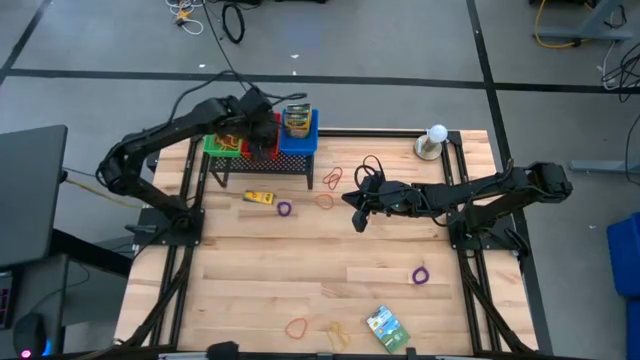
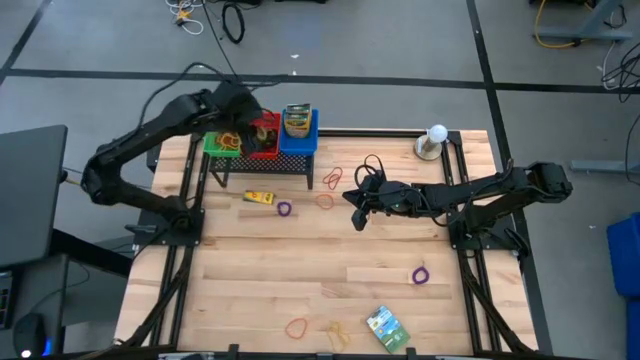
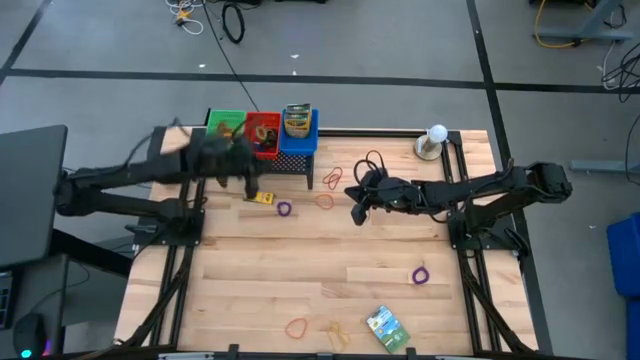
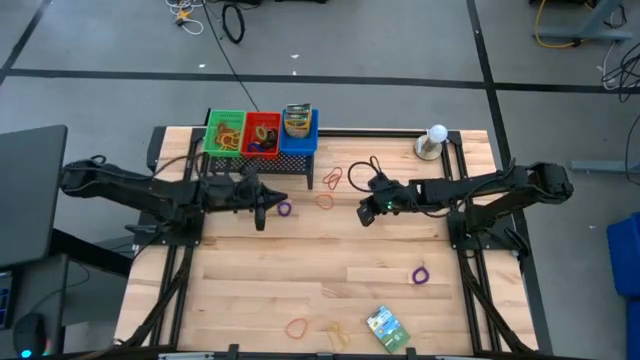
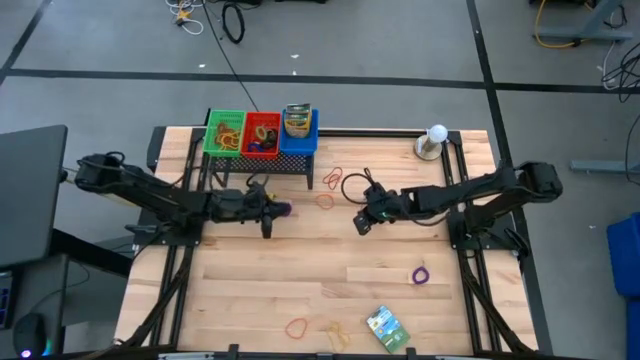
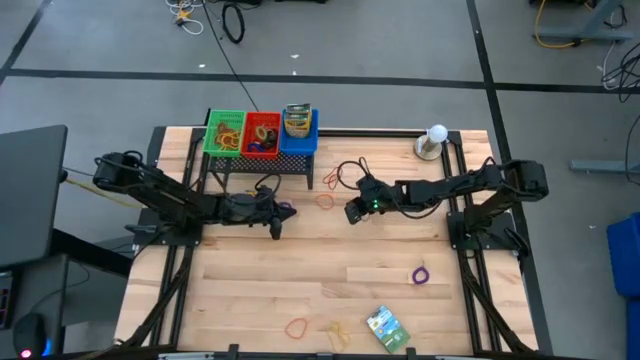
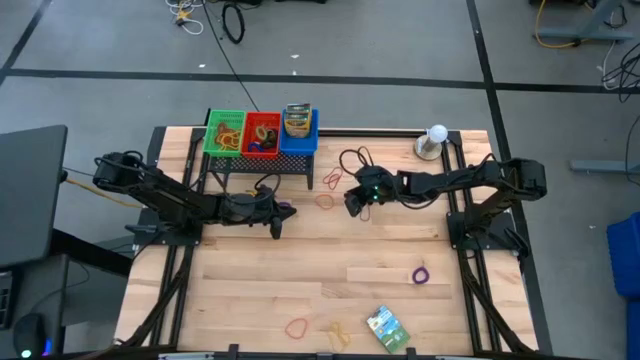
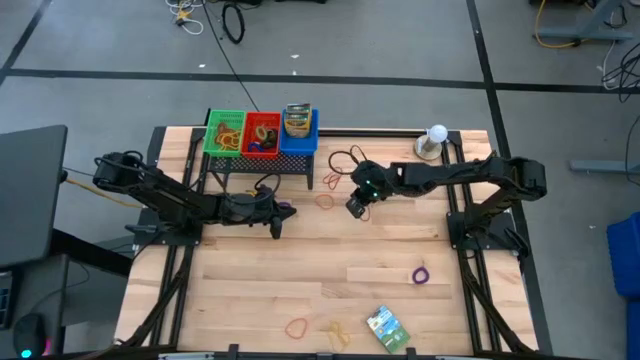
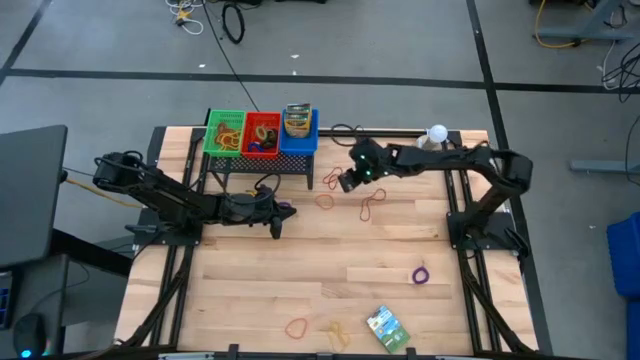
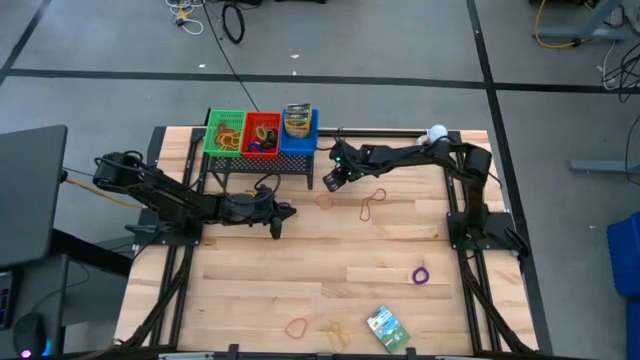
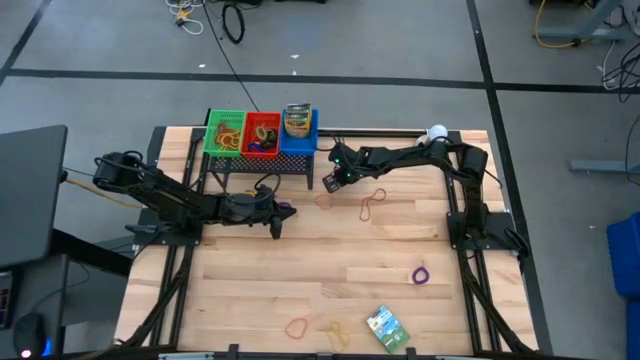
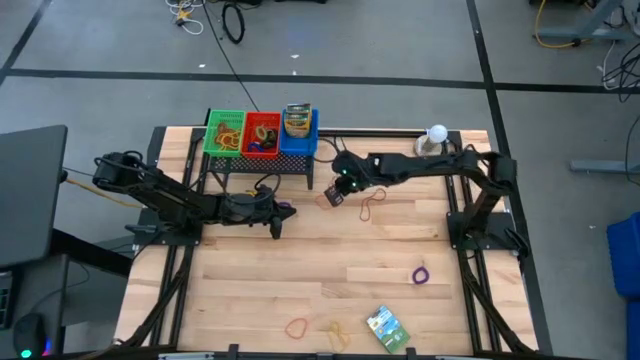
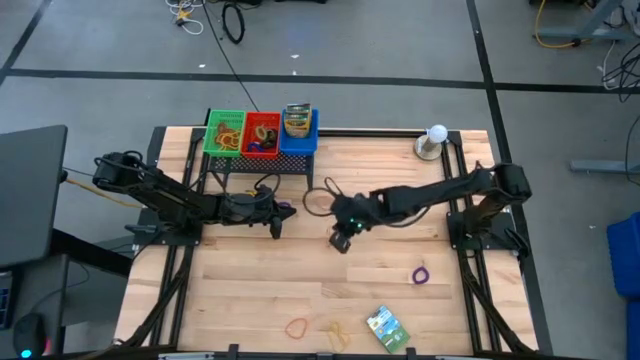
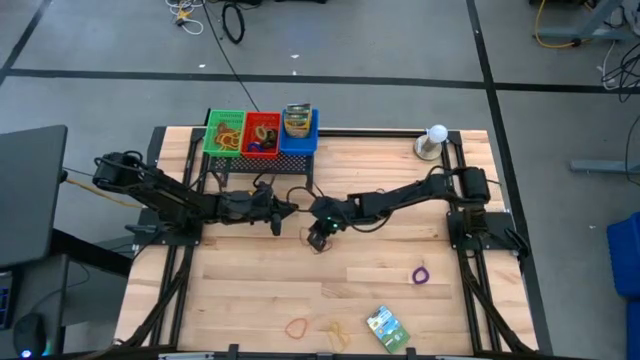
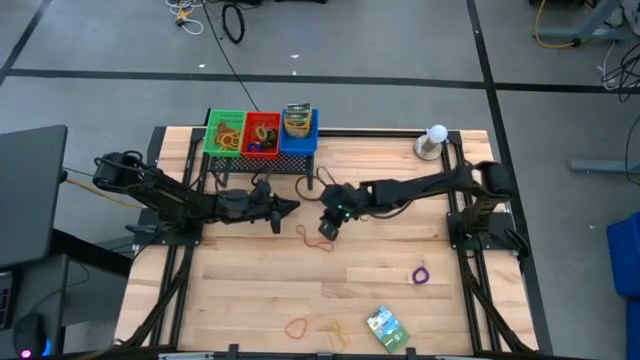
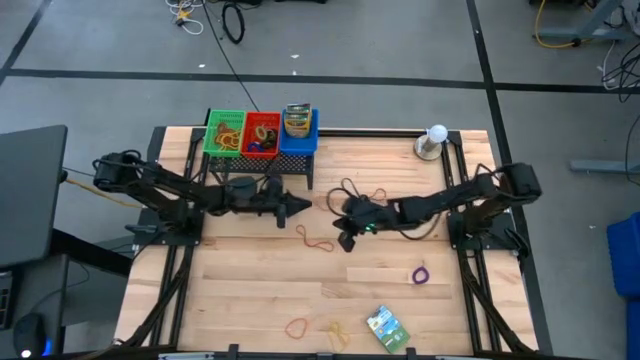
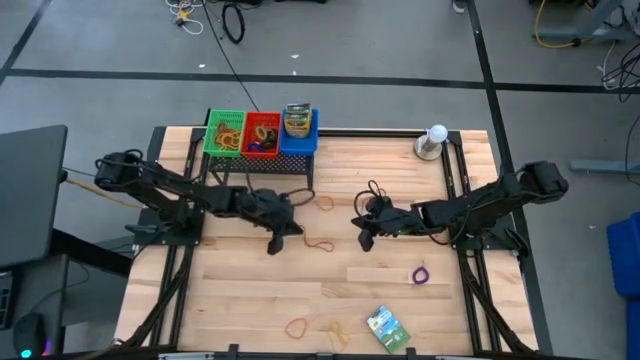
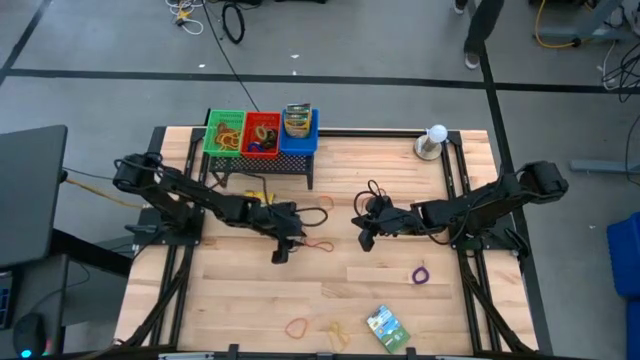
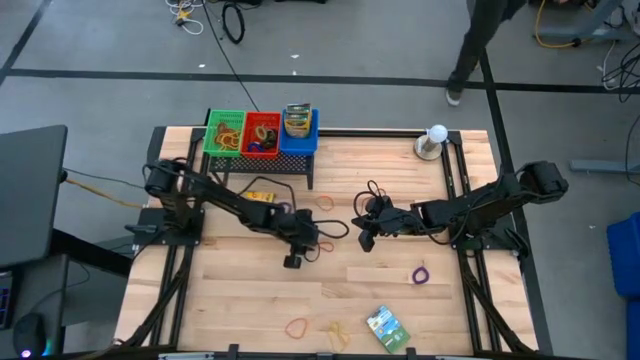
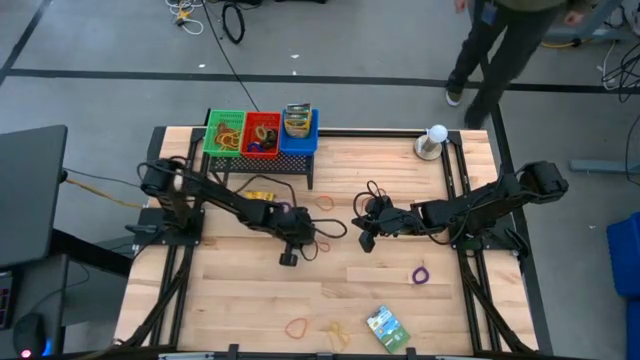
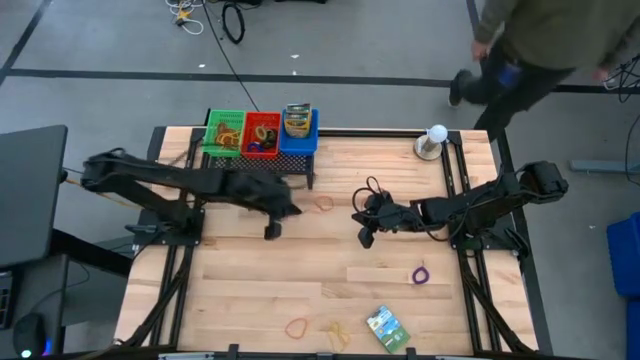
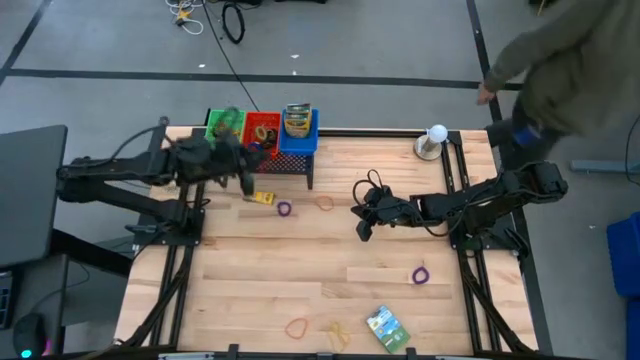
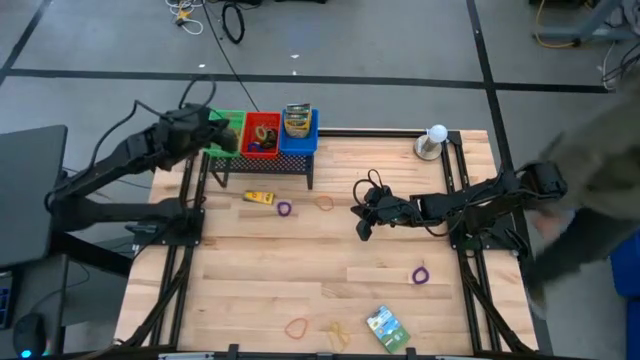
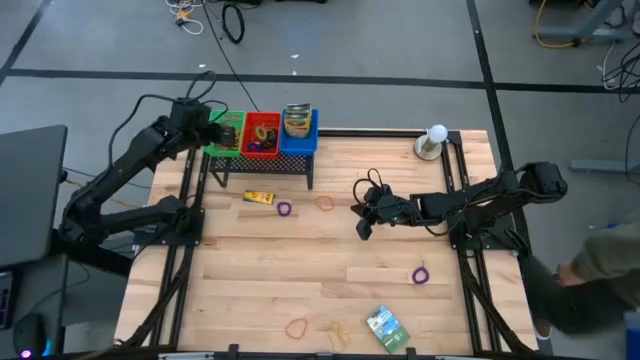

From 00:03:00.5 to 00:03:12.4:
Task: Pick & Place Office Desk Supplies
Put the red rubber band into the green bin on the shelf

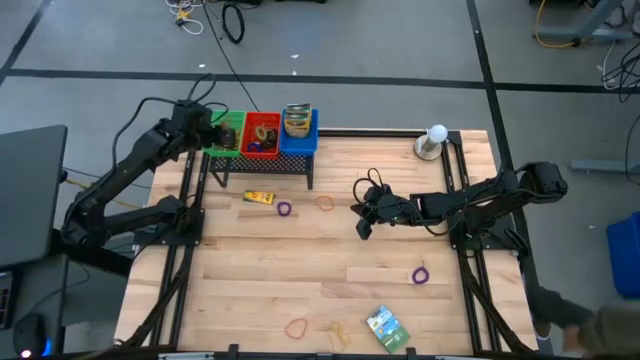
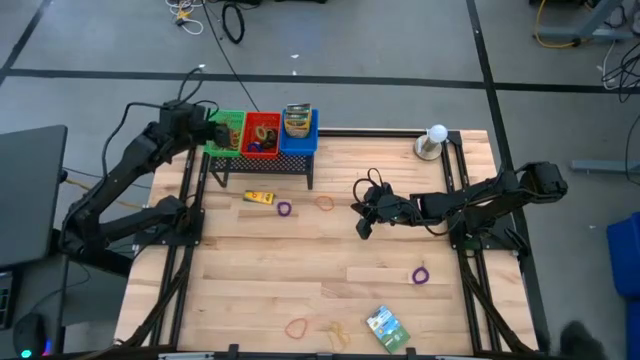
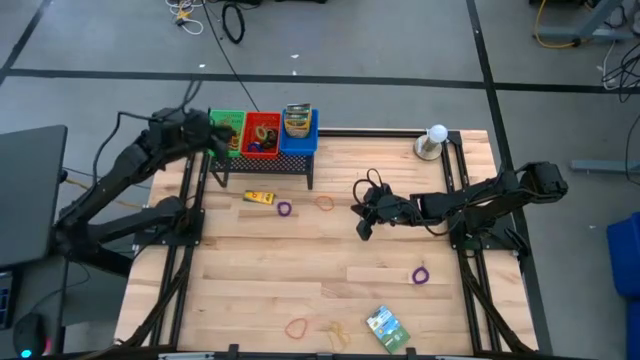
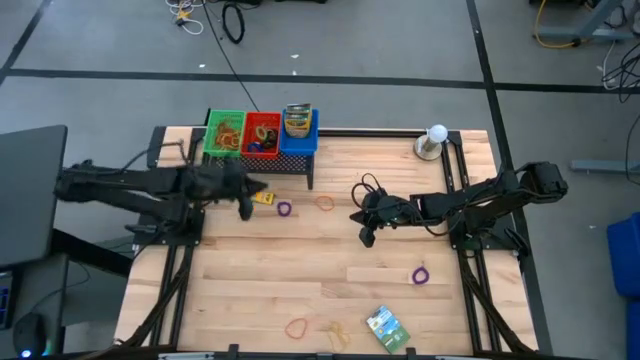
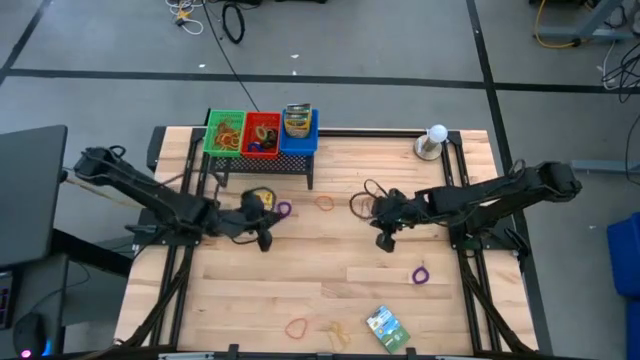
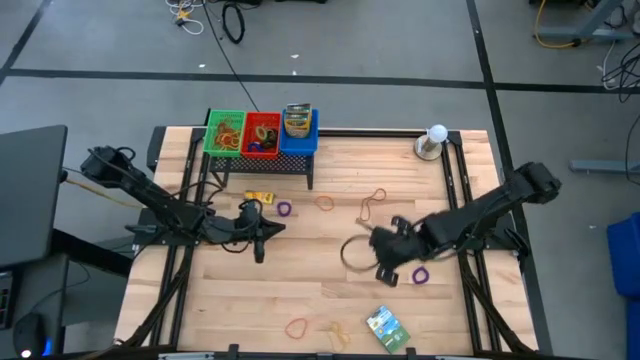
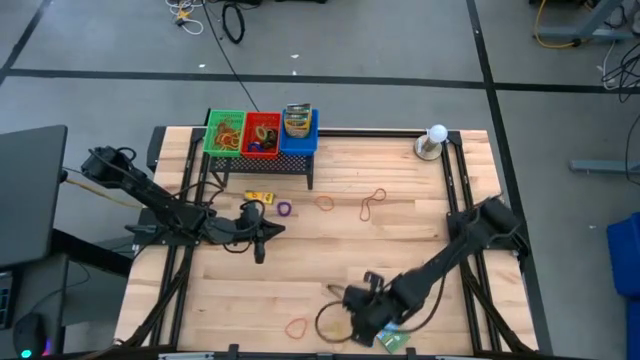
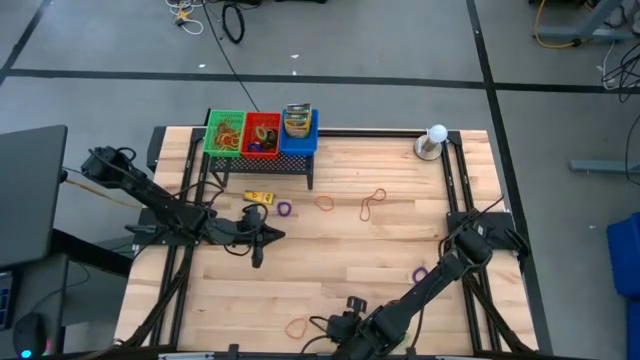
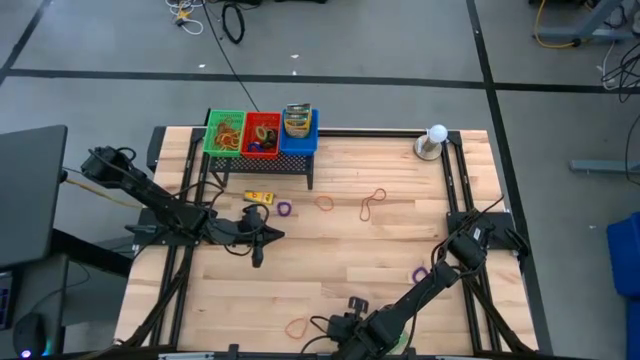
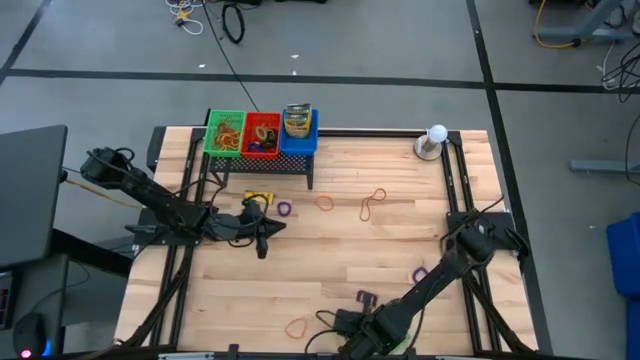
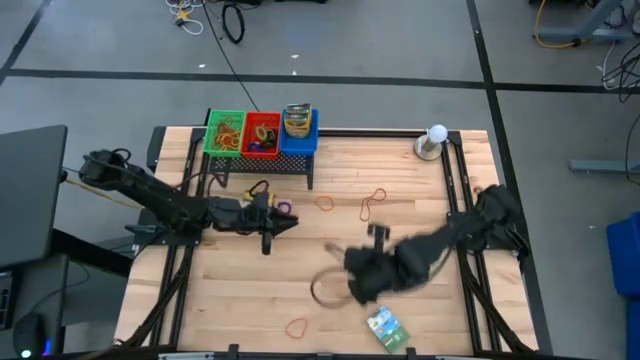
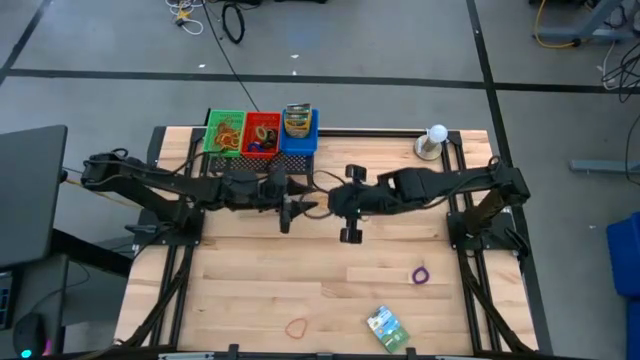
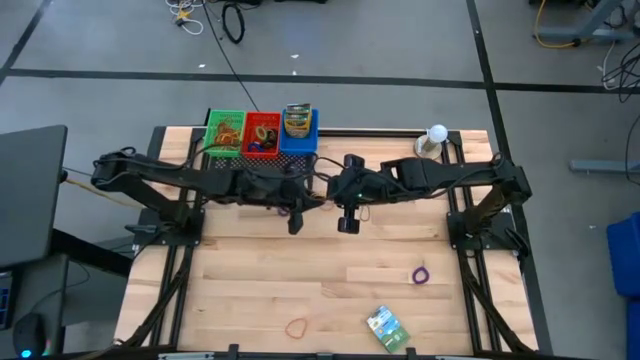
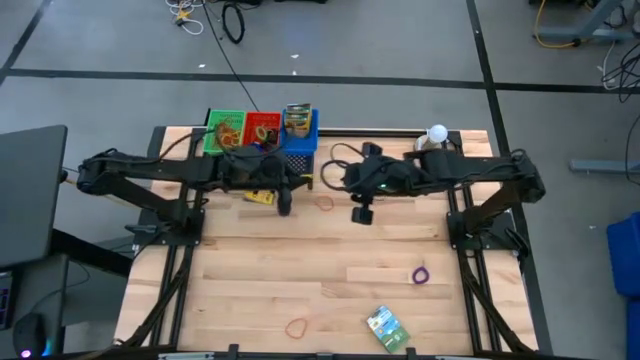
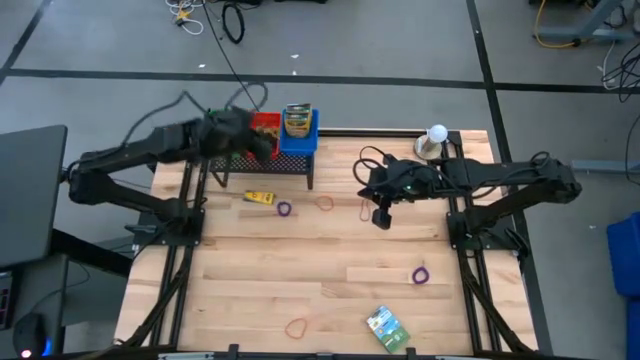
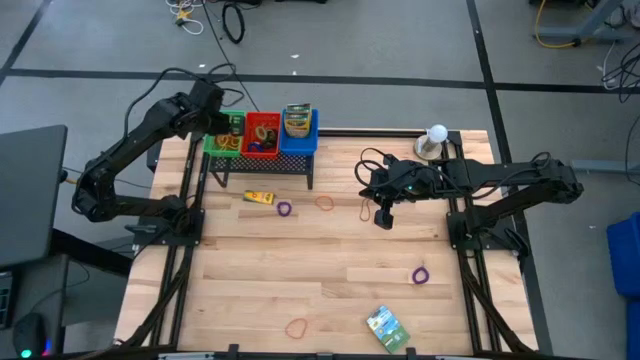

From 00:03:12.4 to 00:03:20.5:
Put the yellow rubber band into the green bin on the shelf

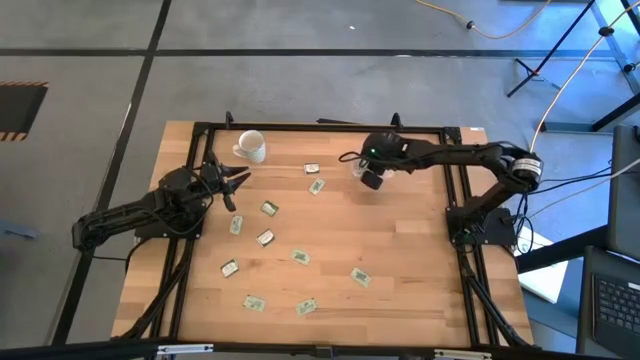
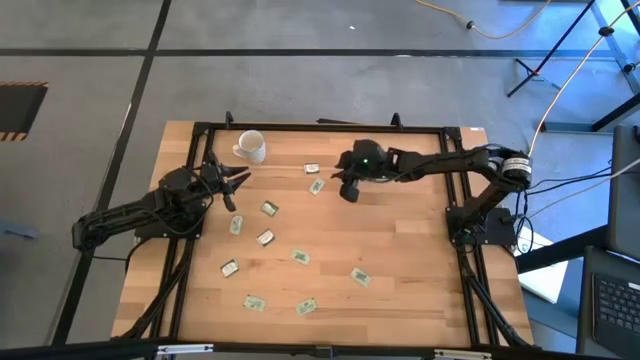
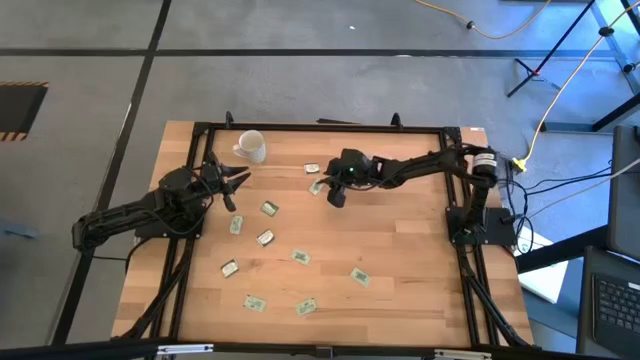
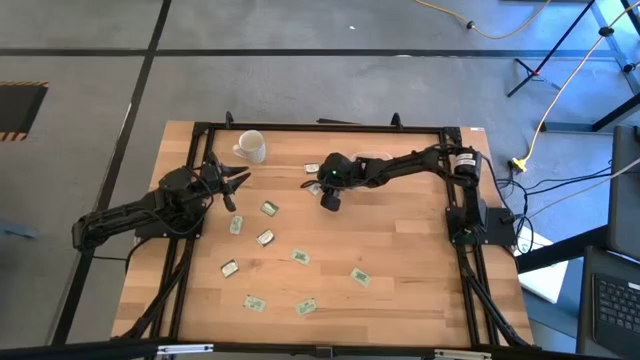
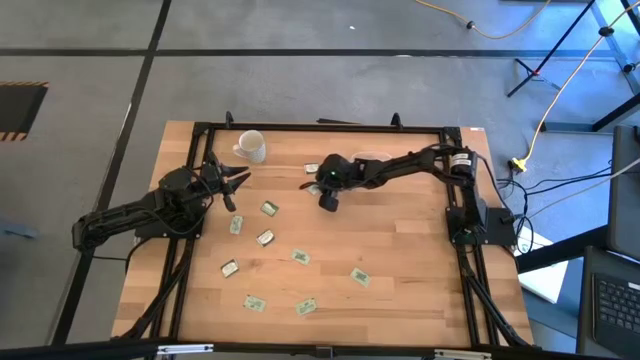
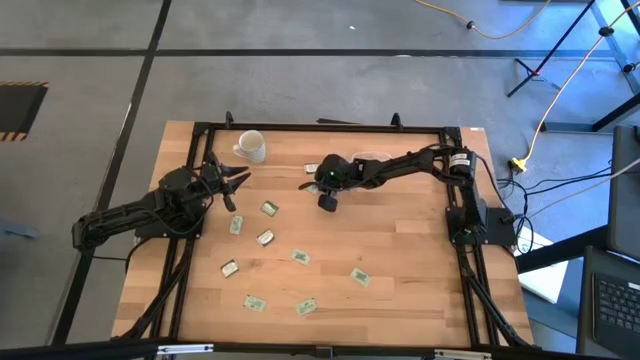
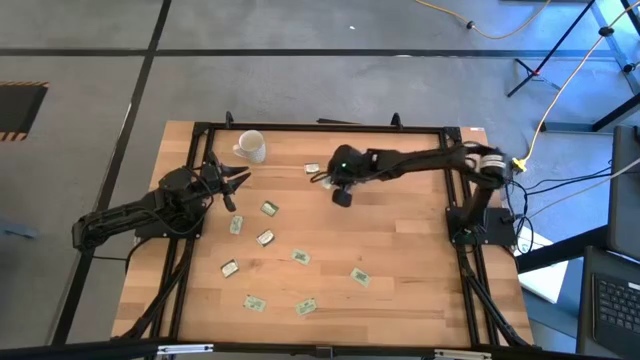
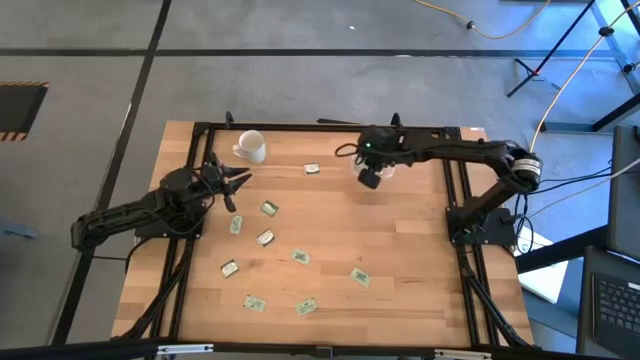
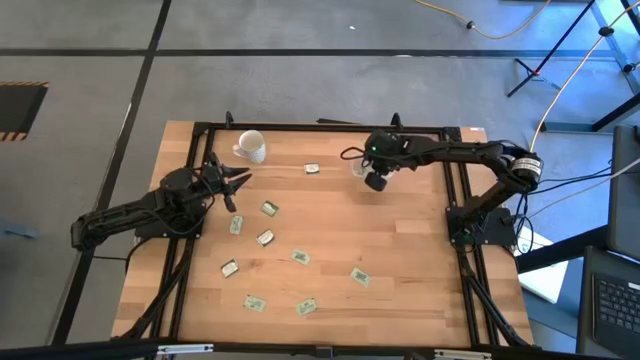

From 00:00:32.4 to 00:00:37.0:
Task: Pick and place items into bin
Put the stevia packet into the transparent bin
